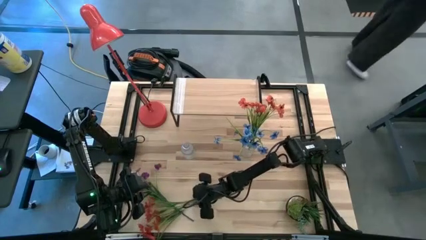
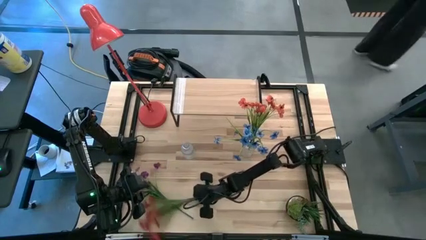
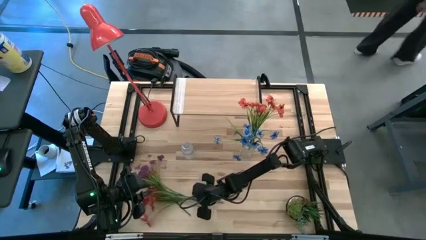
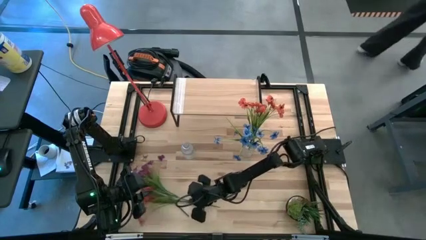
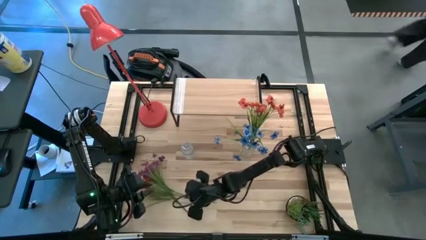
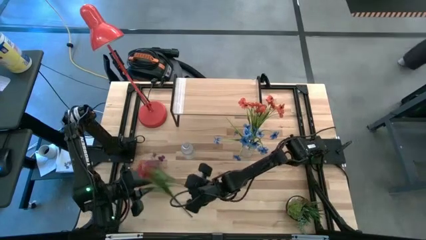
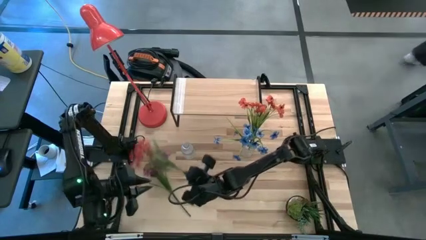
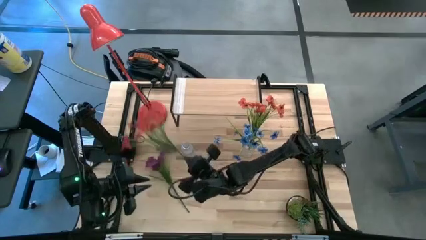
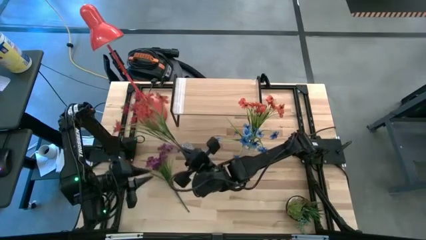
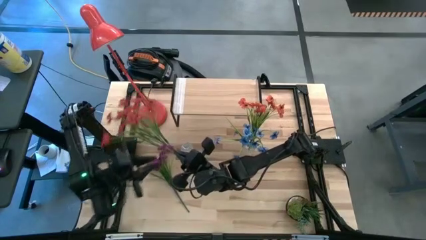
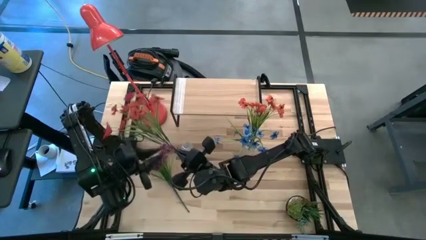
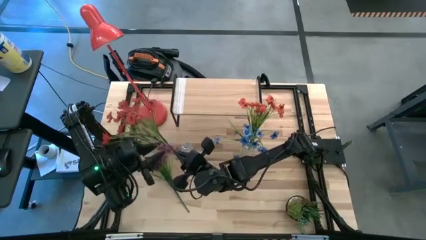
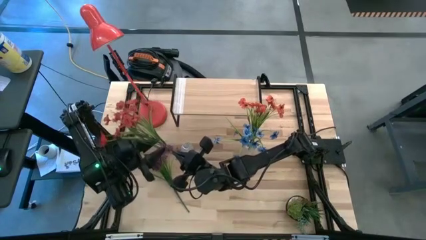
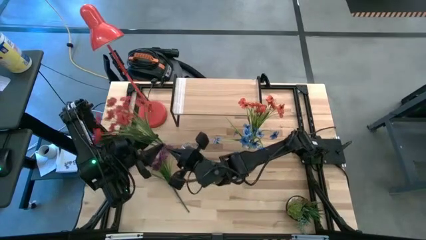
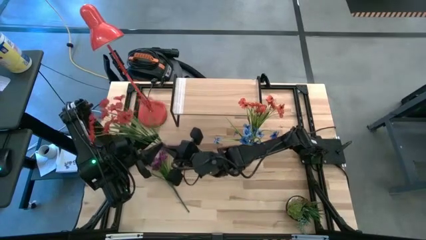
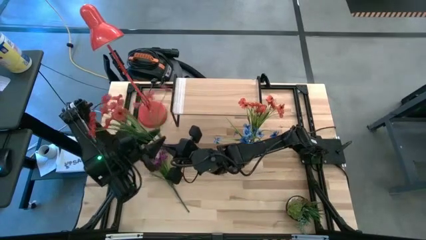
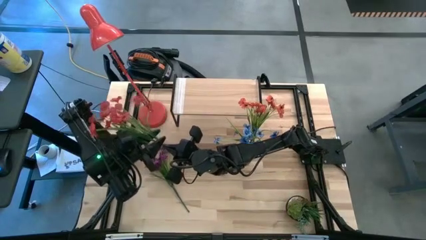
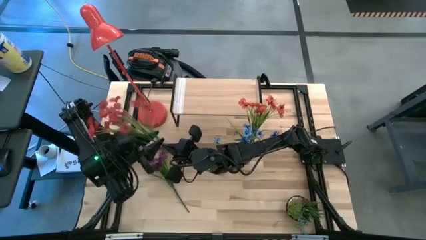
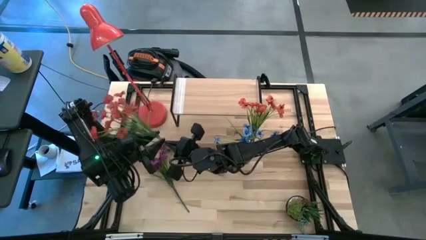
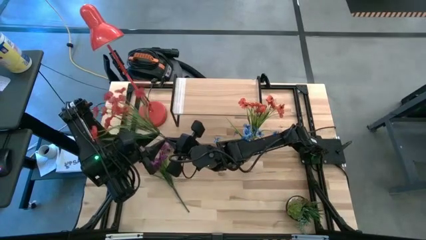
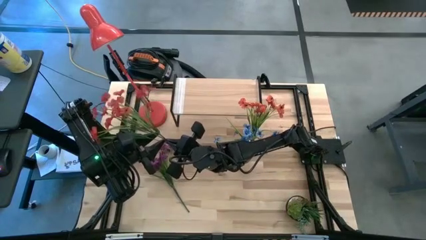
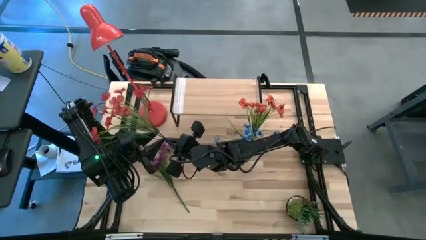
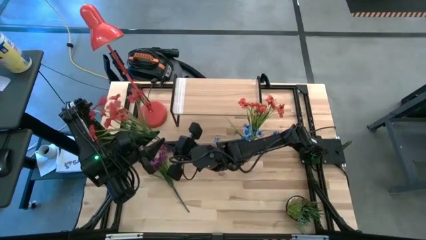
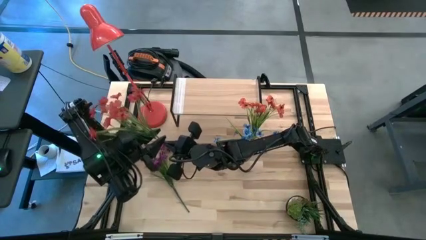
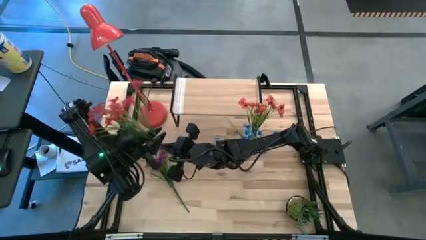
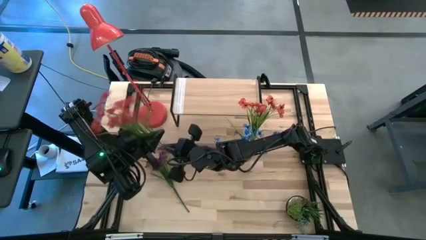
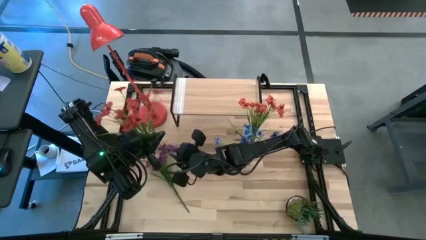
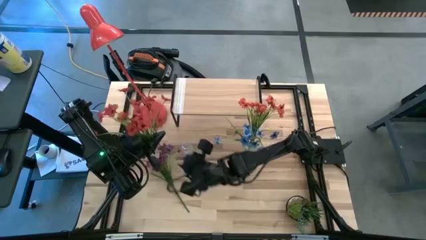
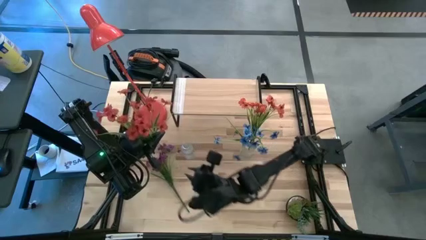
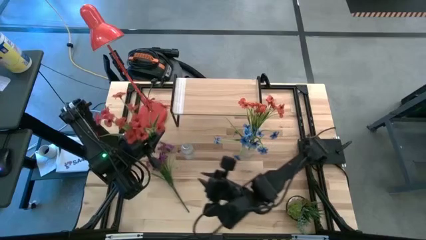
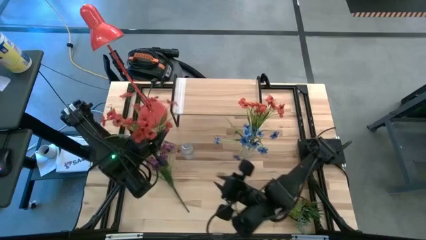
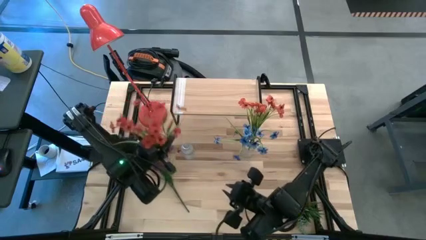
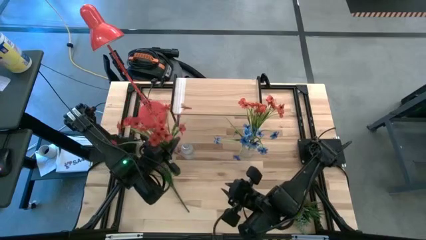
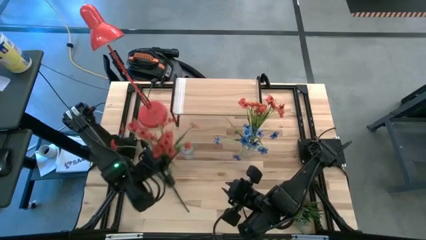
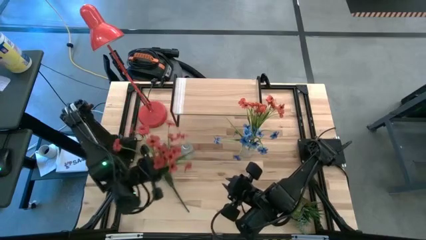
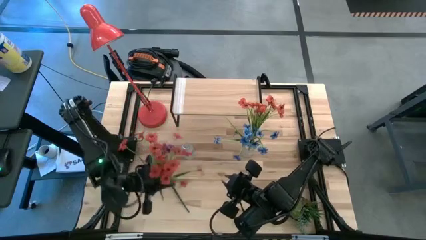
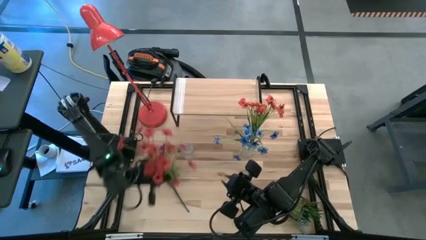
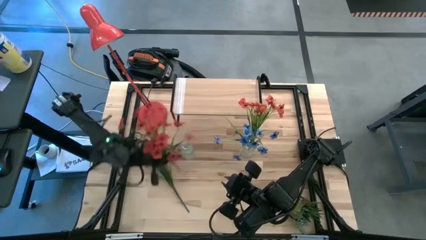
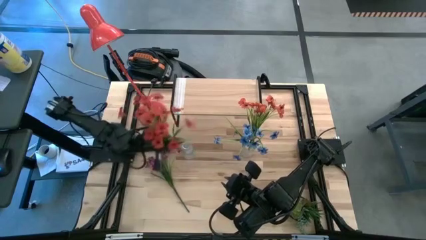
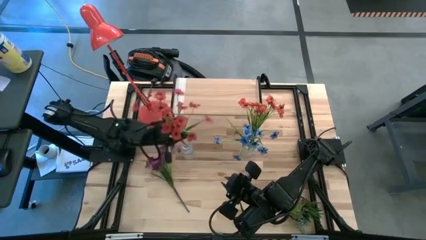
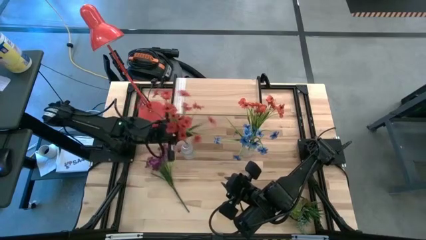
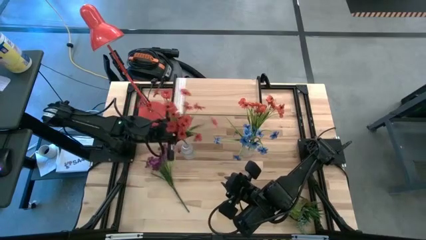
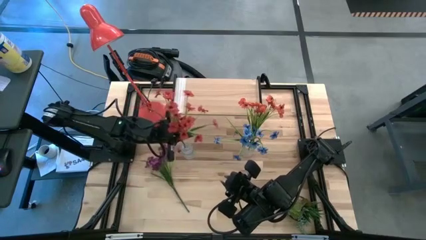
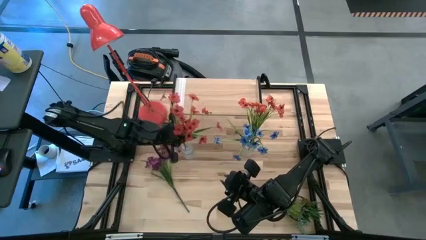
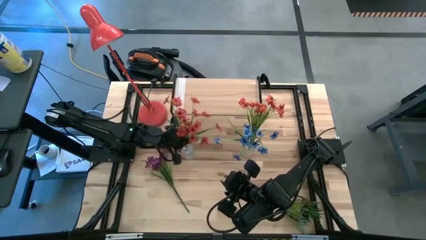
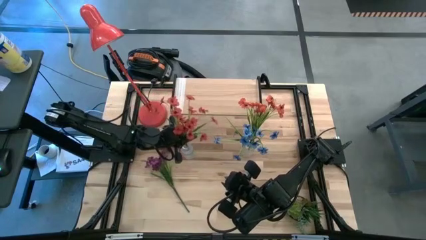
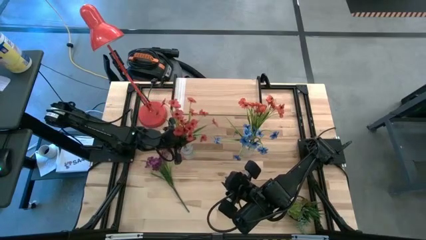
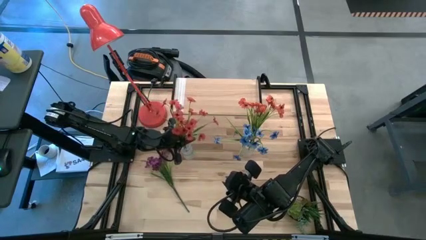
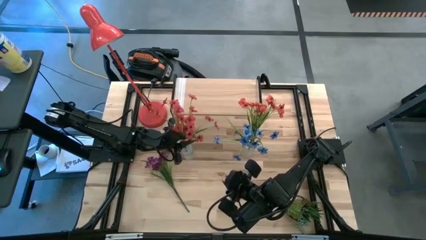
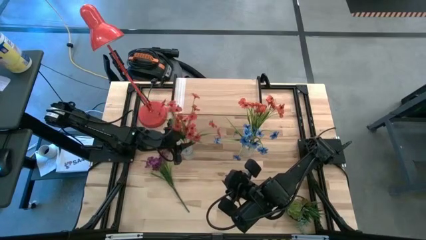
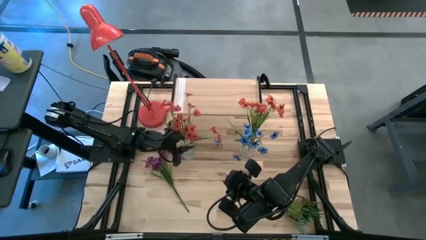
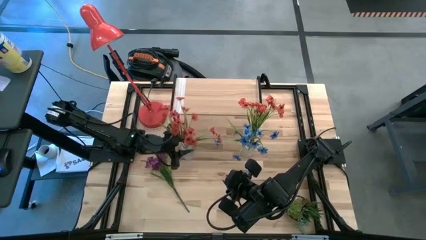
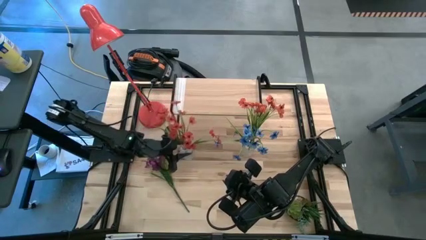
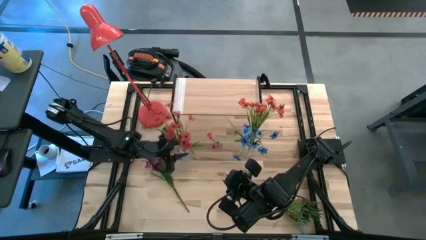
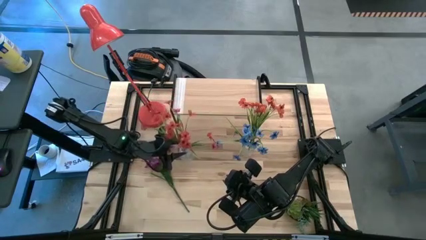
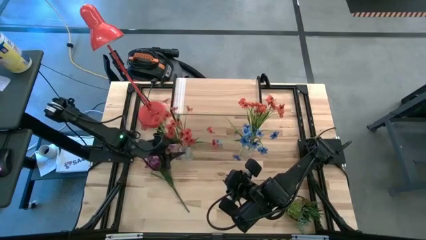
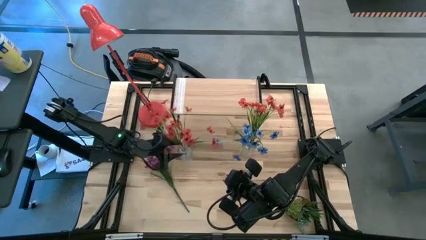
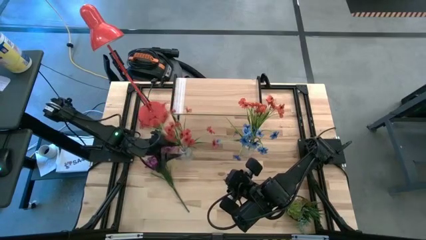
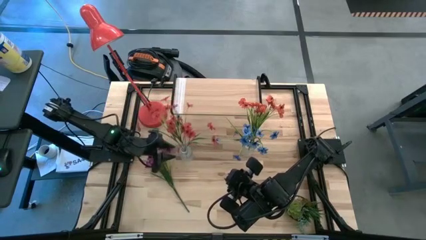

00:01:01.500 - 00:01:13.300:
Task: Pick and place flowers into a vace then onto a shelf
Put the orange flowers into the left transparent flower vase
